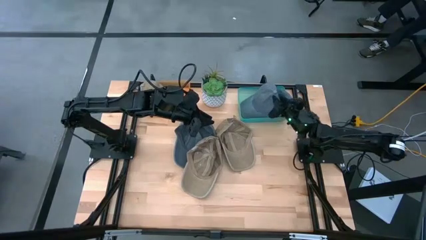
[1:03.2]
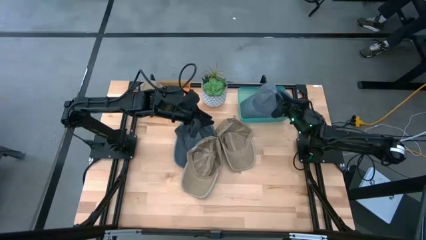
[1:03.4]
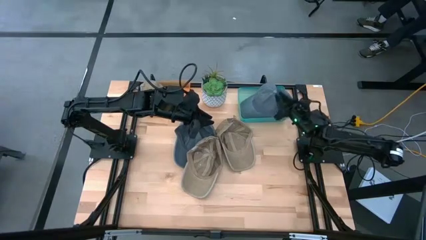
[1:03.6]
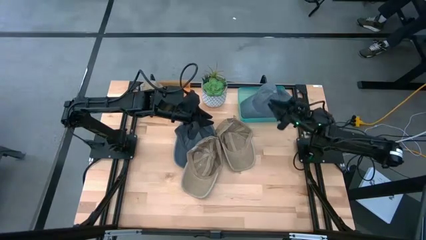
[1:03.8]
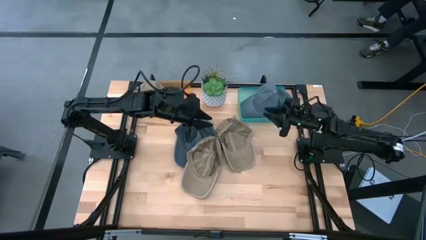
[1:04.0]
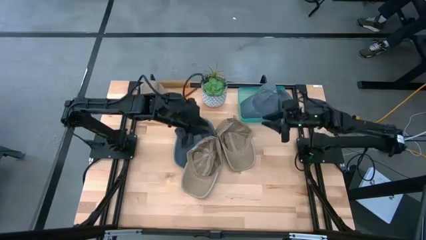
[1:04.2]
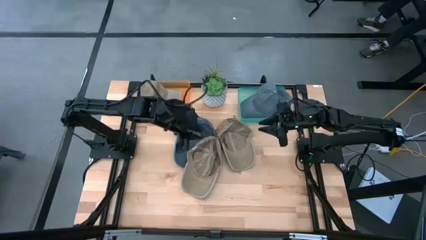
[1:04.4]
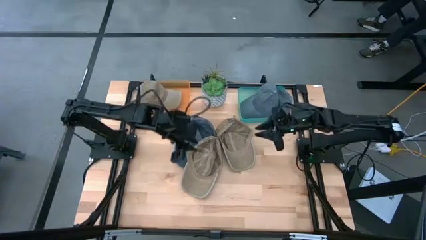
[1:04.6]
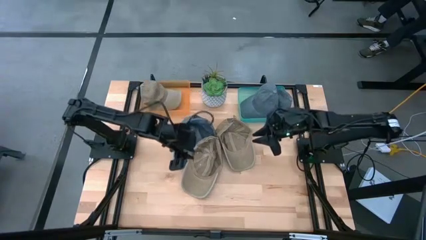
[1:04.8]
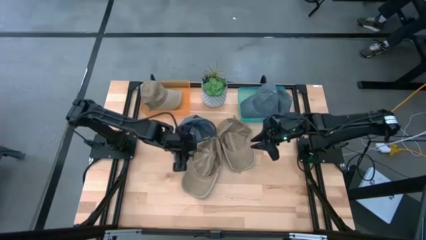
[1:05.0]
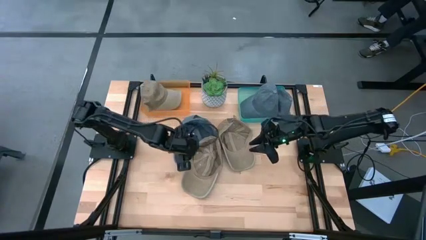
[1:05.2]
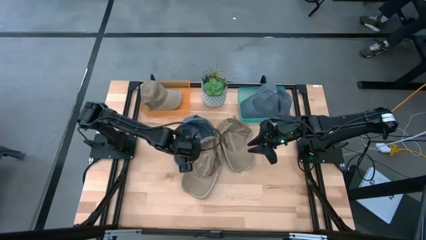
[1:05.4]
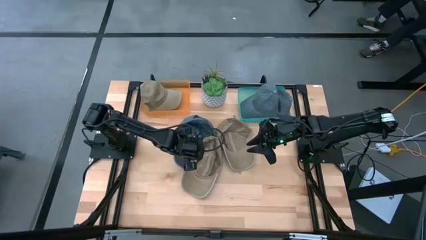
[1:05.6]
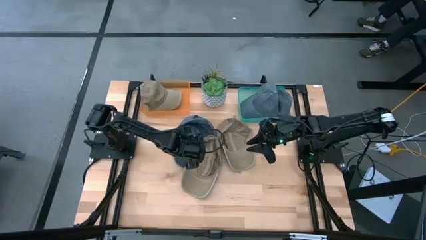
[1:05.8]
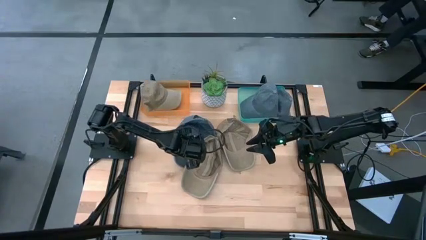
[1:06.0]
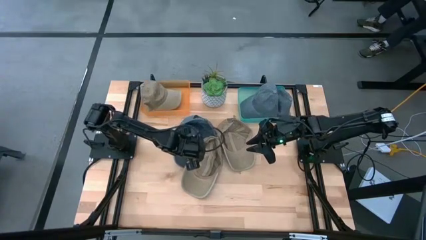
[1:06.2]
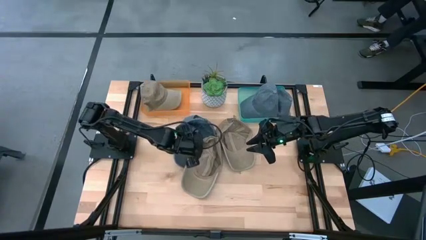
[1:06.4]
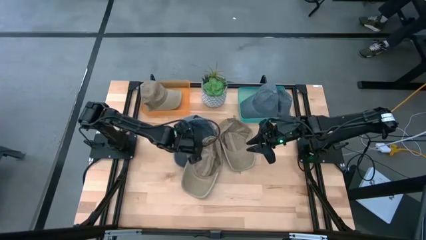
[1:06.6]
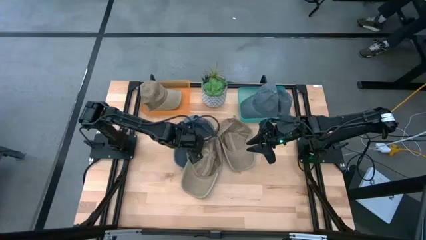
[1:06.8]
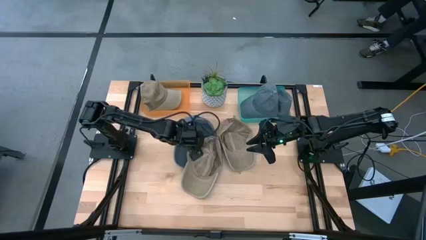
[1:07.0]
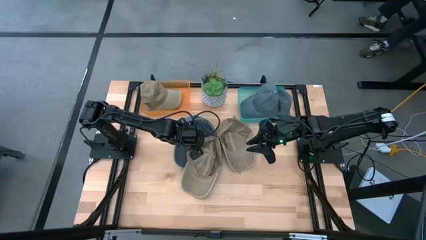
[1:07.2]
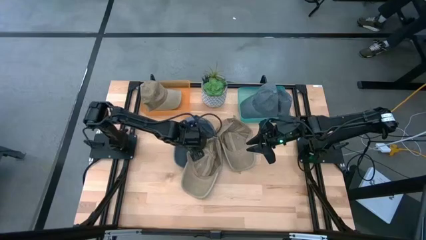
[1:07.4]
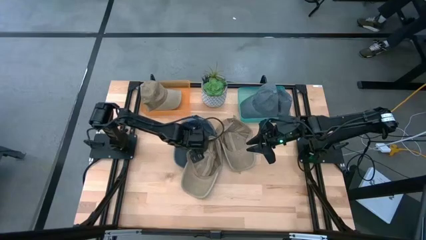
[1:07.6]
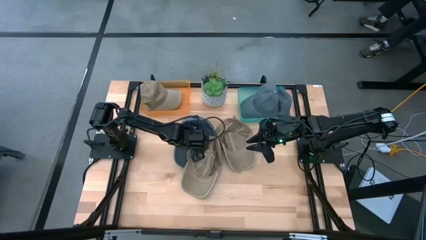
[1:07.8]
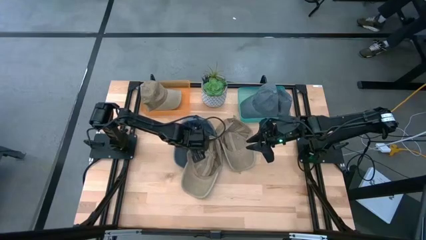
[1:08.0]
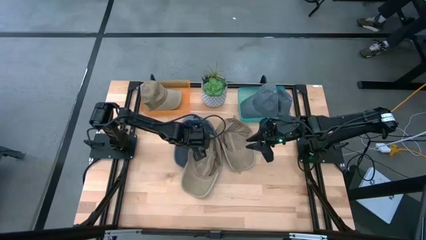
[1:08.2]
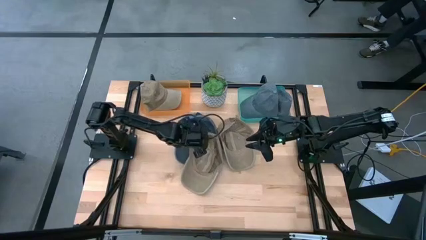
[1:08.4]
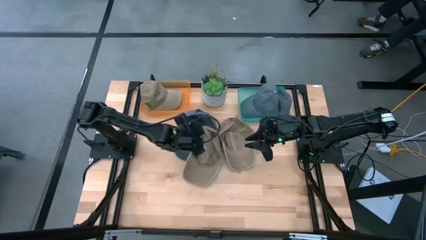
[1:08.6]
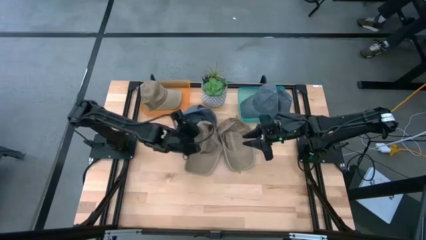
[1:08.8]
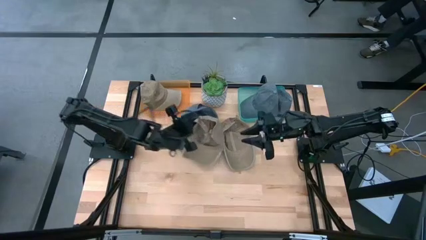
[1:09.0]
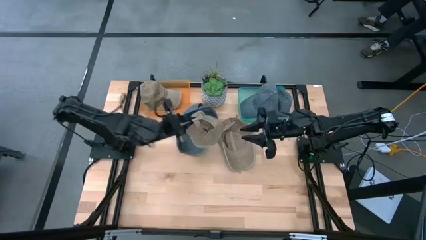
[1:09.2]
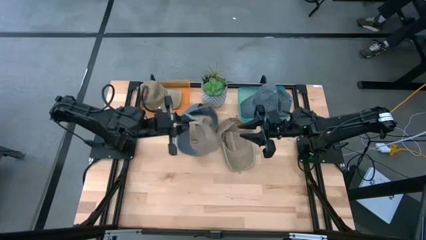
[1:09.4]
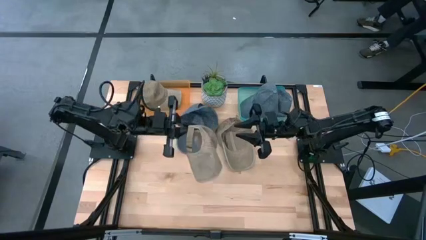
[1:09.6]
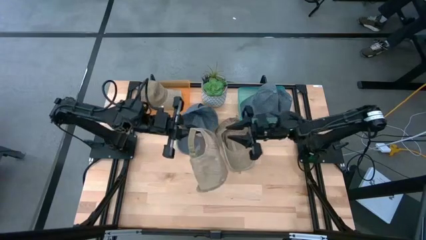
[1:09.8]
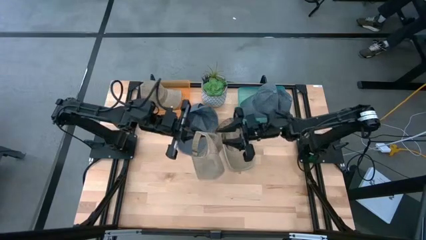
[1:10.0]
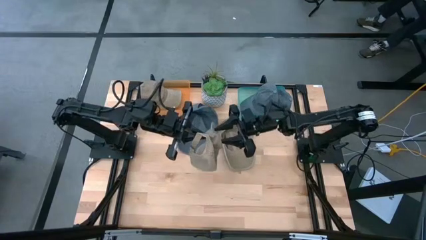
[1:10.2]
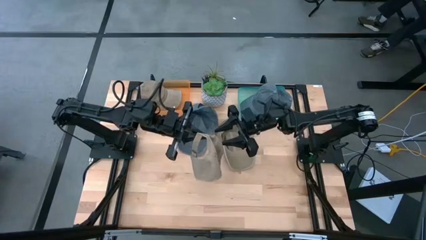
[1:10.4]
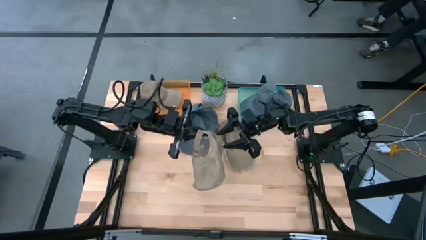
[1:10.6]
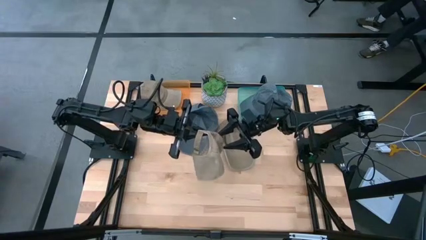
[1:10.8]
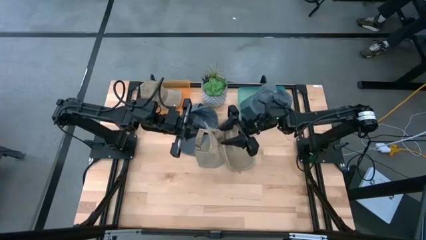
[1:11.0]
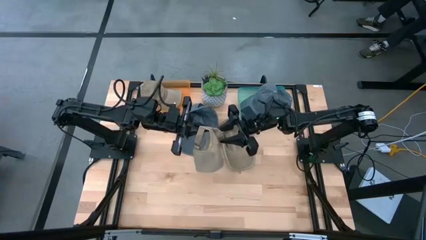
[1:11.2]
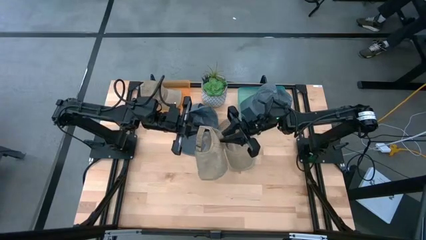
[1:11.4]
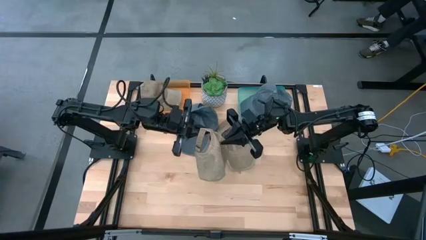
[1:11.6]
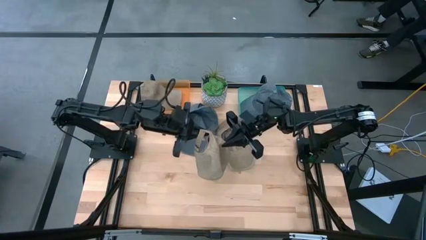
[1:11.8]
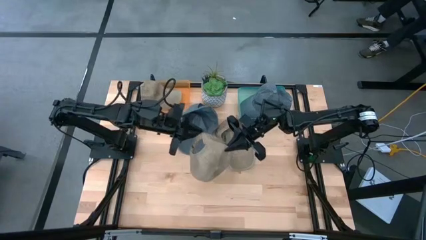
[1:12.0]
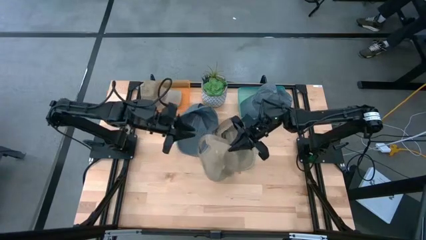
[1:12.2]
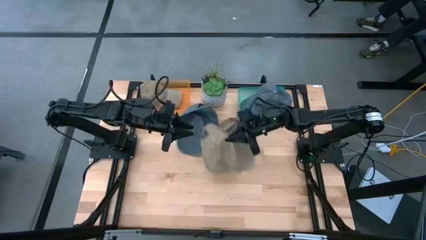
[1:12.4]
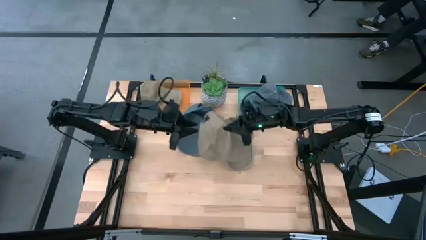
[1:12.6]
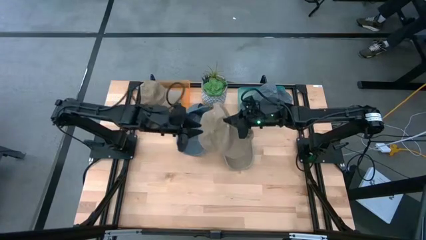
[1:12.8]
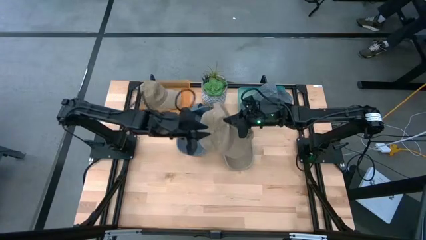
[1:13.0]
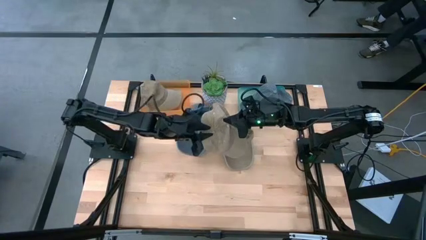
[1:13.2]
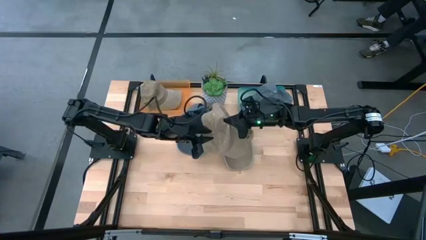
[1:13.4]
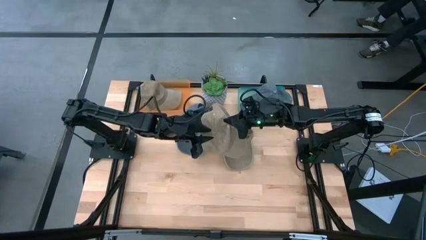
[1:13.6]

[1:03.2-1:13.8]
Task: Pick & Place hat
Put the left brown cap into the orange bin

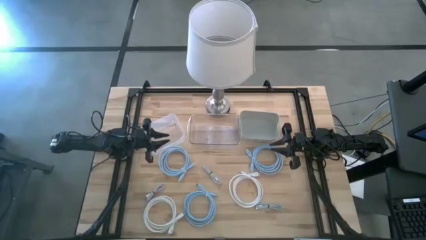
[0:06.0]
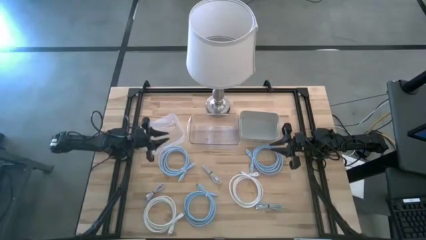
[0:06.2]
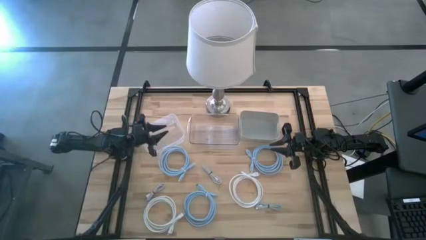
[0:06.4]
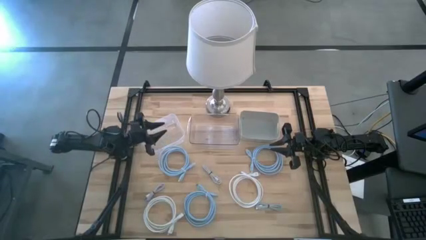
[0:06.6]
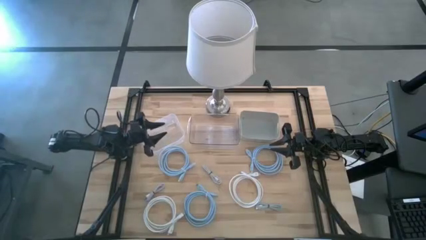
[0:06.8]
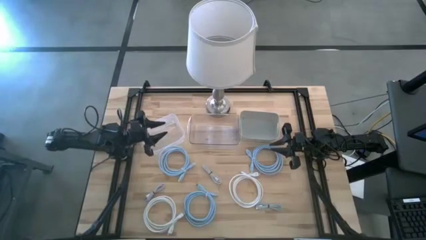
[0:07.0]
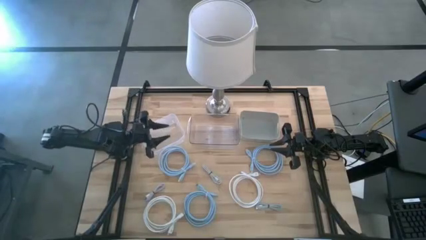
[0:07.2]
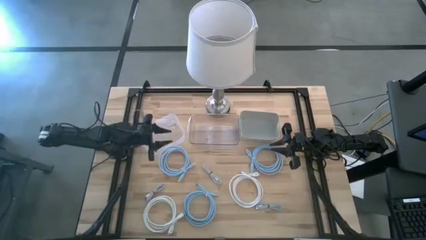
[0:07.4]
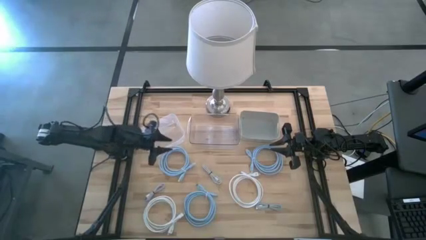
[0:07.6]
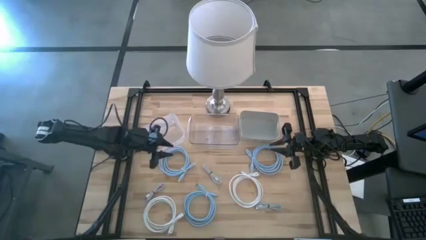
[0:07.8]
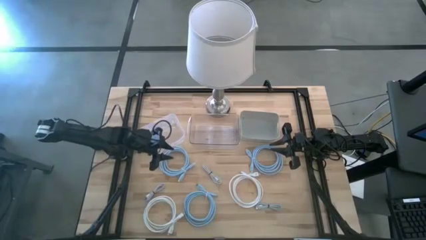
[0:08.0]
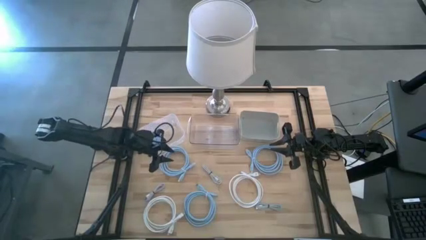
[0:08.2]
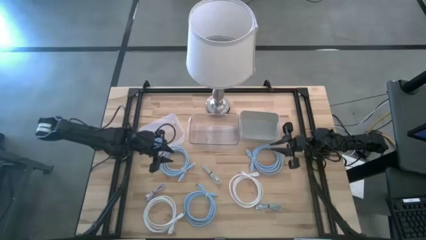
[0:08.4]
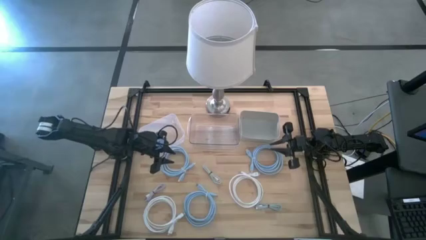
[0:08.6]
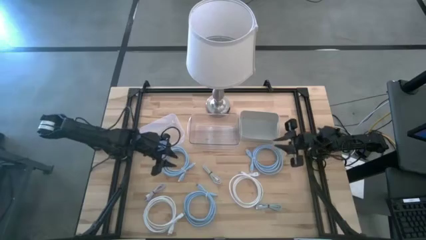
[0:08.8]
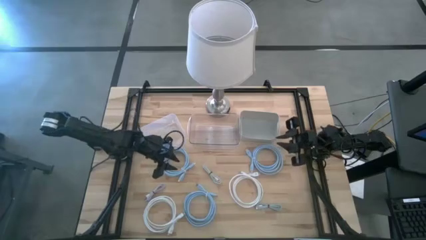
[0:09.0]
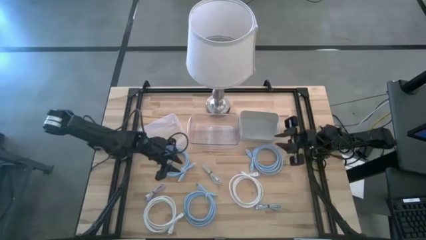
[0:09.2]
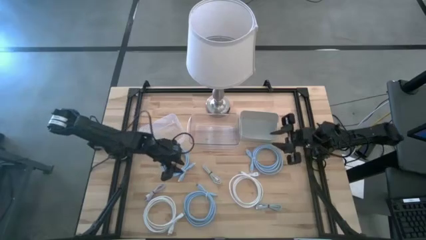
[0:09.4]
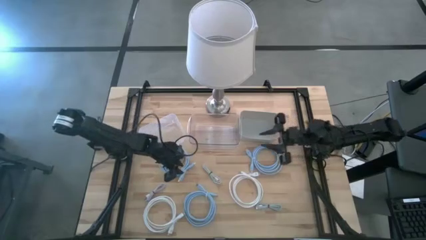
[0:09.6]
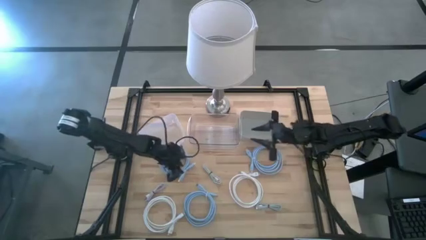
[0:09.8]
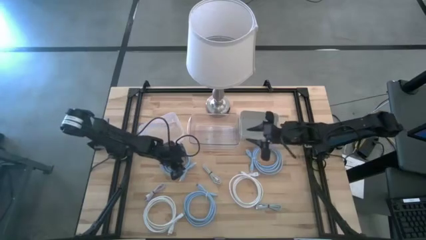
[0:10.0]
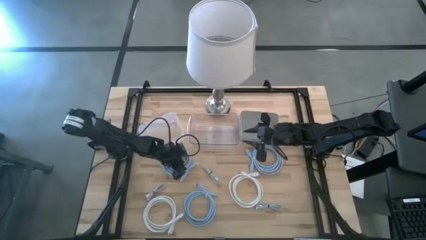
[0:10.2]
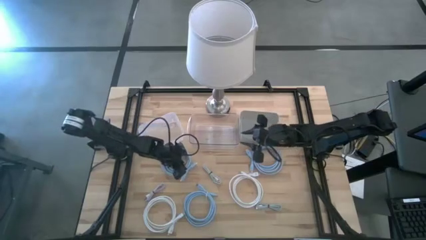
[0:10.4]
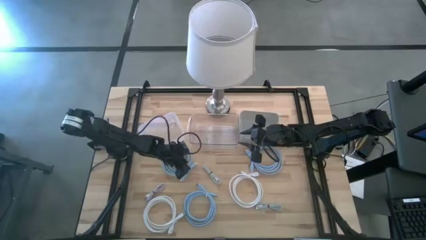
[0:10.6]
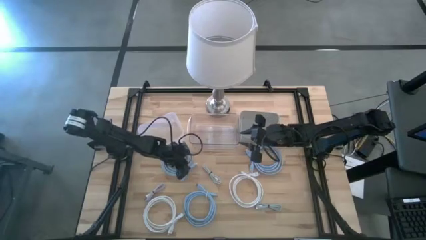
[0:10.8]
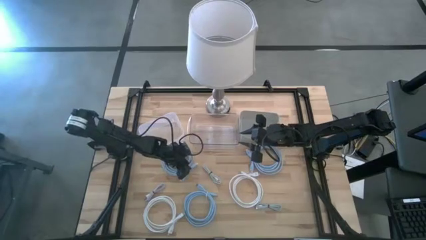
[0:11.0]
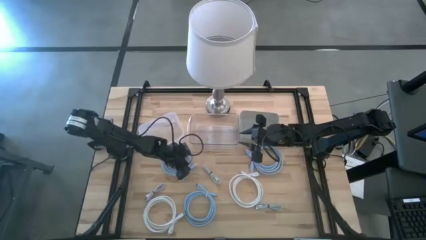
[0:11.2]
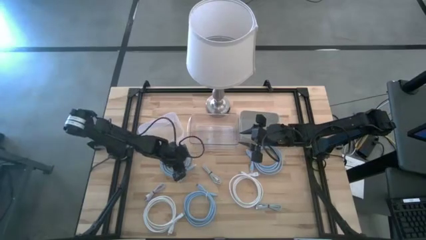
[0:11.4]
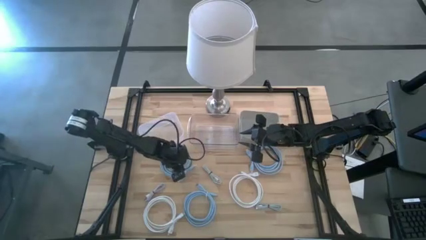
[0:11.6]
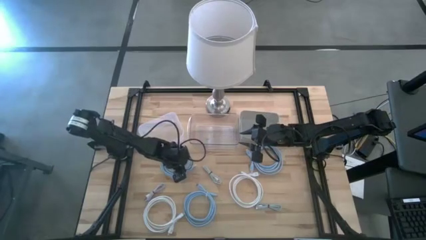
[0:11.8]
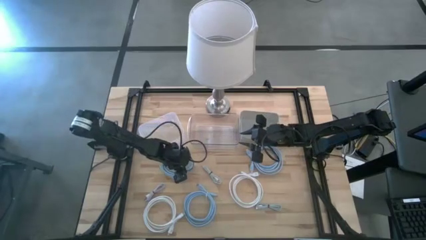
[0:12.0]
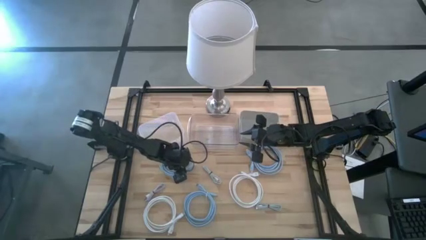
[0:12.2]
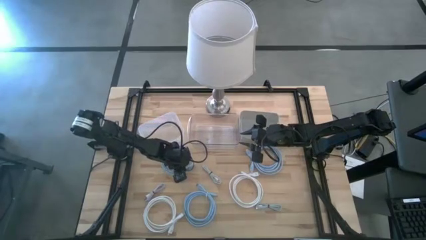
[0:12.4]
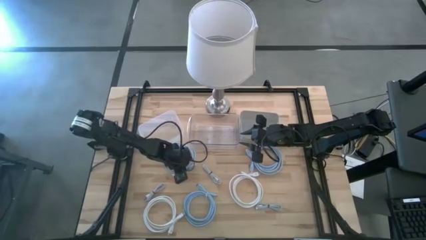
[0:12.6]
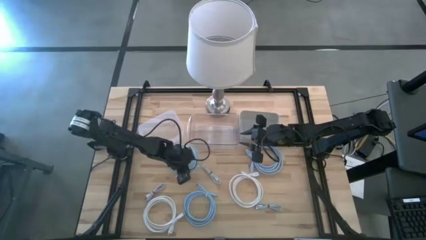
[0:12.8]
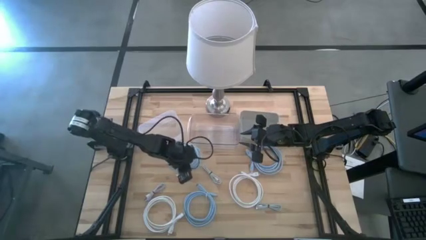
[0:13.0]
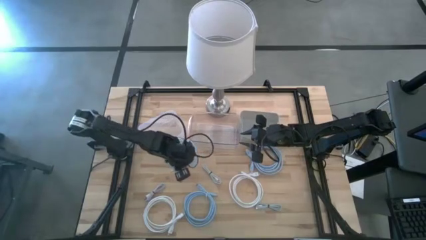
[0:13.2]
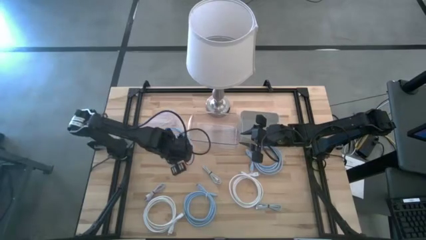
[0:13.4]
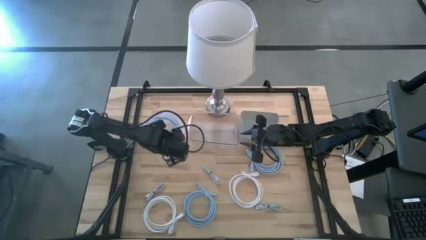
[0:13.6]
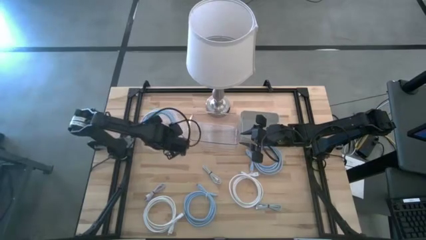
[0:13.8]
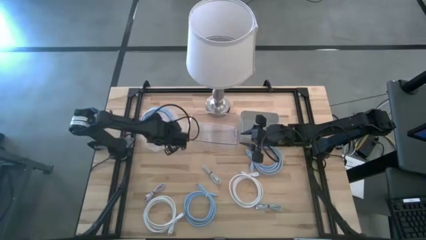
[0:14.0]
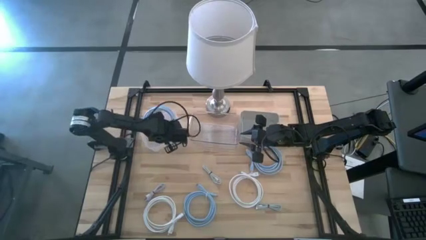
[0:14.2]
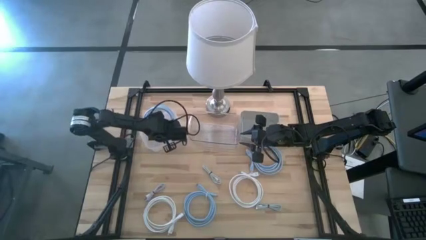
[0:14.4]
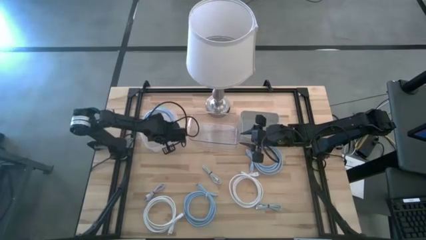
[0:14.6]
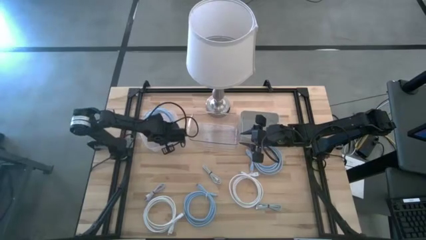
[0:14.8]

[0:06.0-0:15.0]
Task: Pick & Place USB Port
Put the top left blue hdmi cable into the white bin
